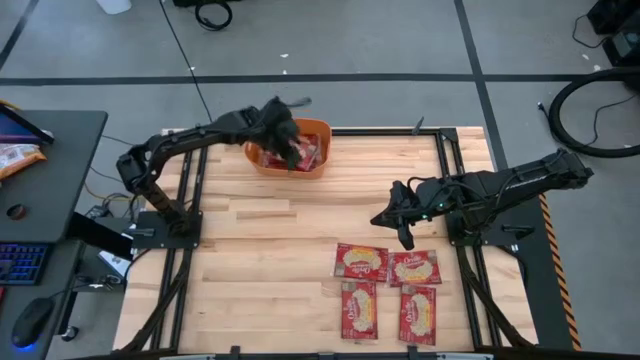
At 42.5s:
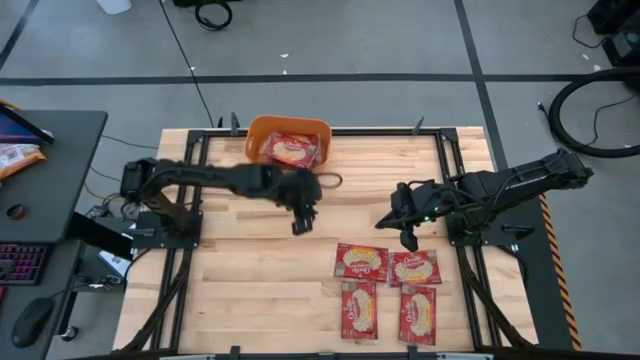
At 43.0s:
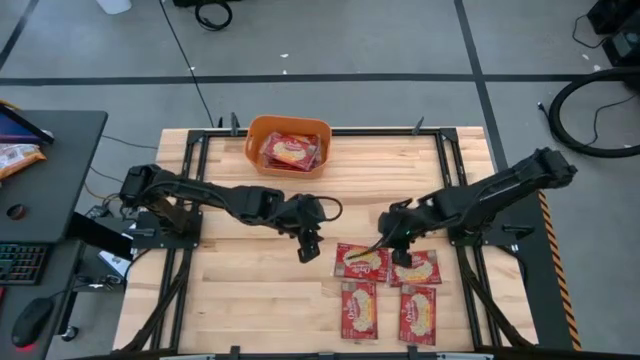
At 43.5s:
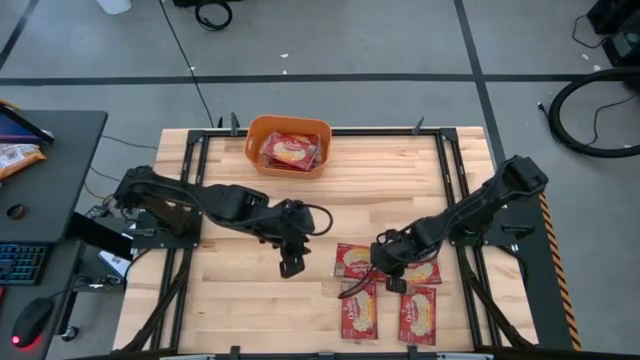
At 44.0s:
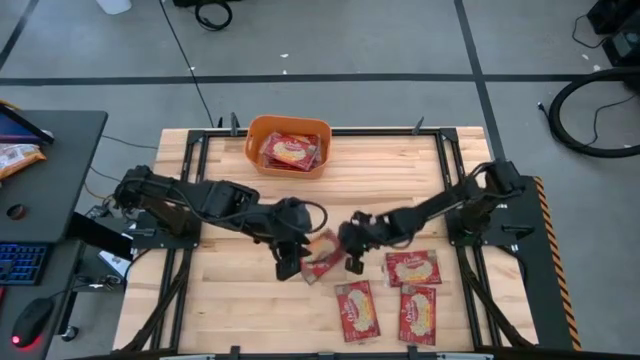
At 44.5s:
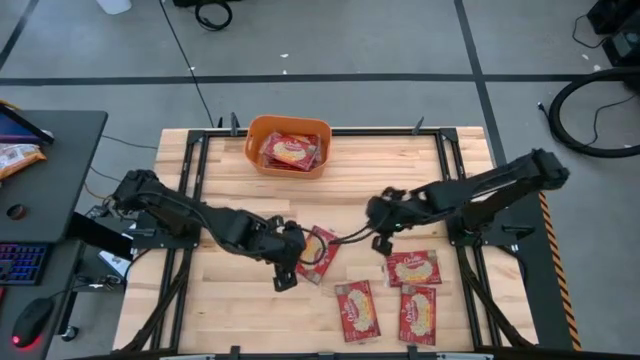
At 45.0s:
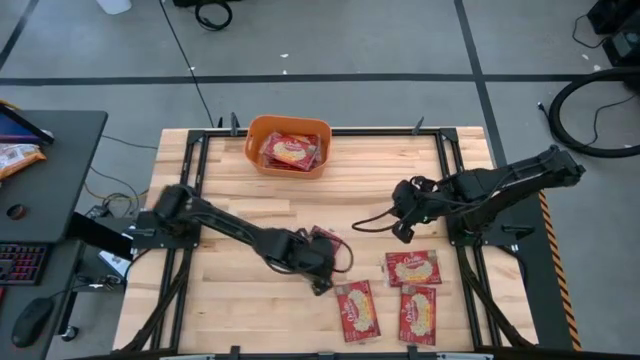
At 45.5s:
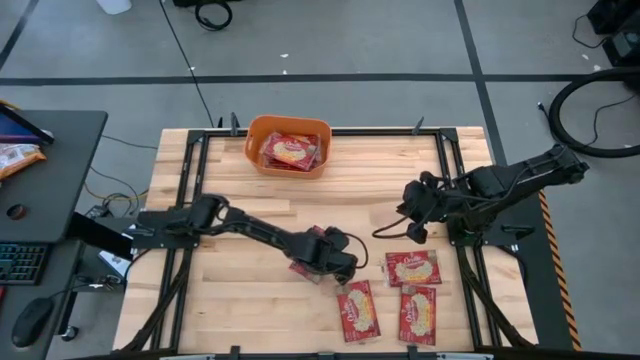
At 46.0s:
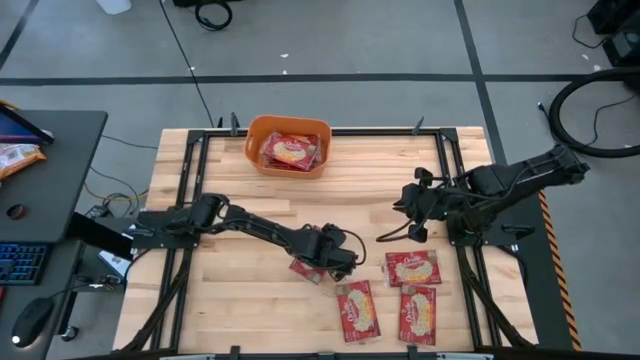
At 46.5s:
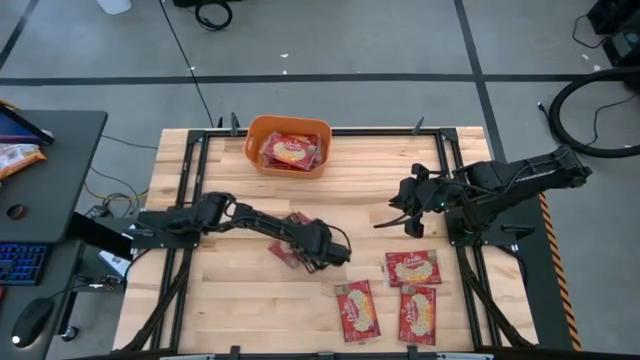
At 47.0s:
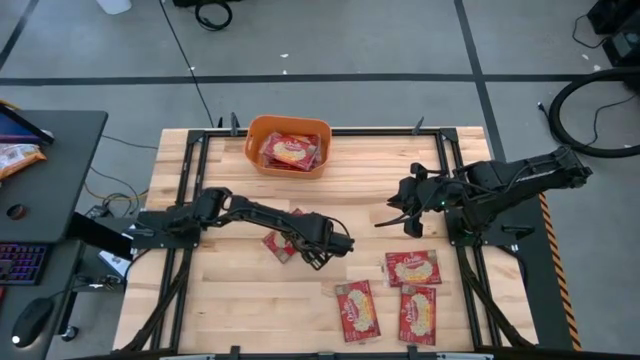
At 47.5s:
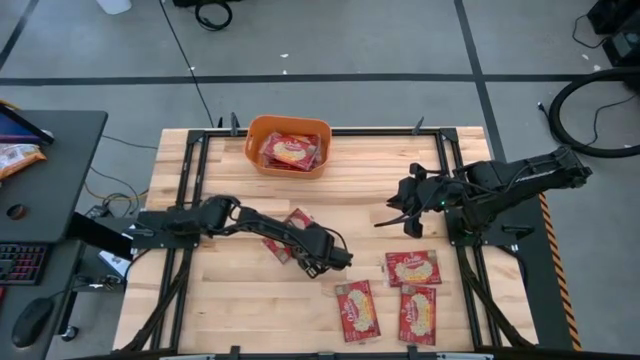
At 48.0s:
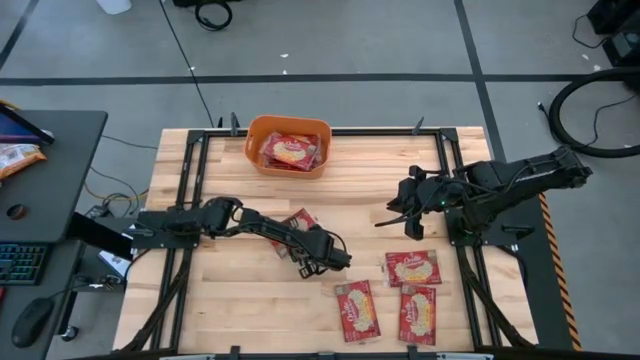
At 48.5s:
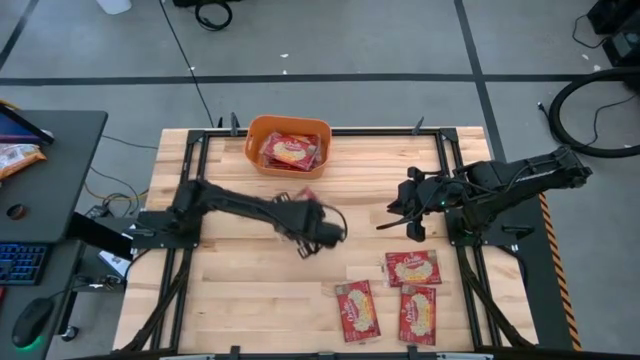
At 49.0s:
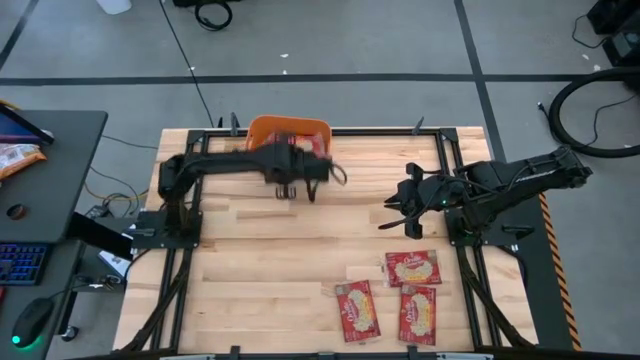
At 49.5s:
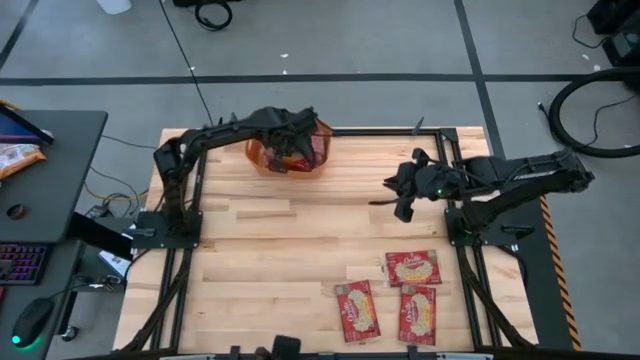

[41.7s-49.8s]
Task: Sort popcorn bags into baskets
Put the red popcorn bag into the orange container

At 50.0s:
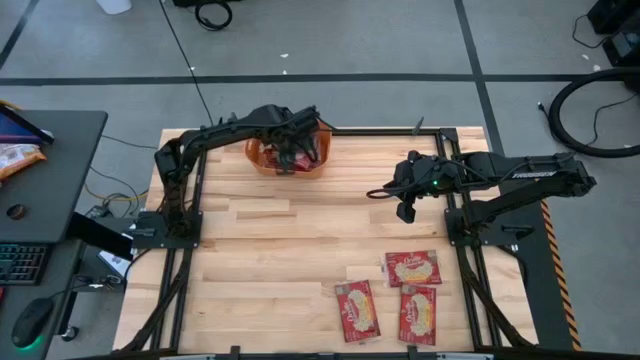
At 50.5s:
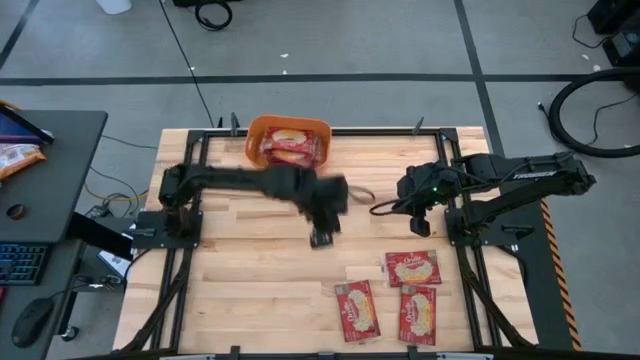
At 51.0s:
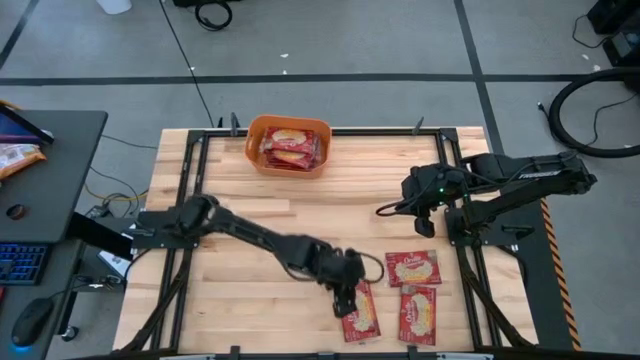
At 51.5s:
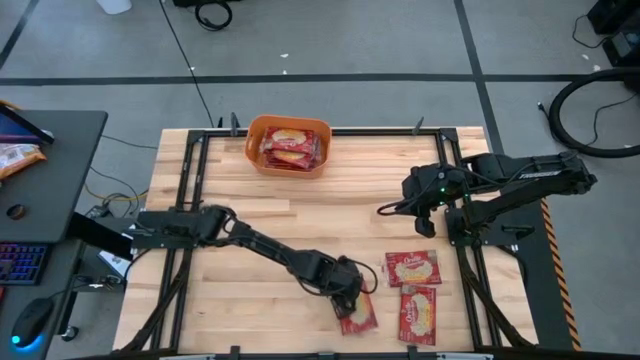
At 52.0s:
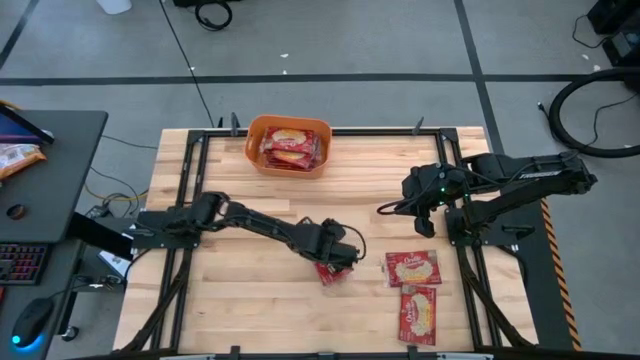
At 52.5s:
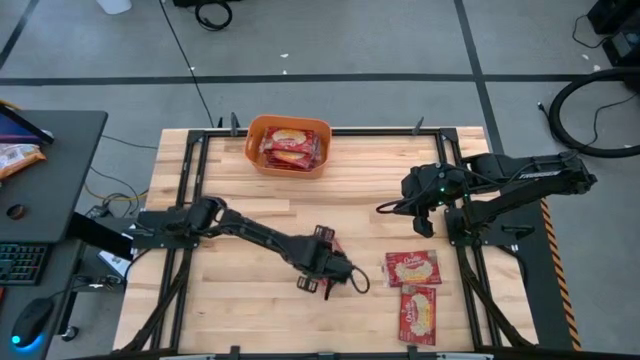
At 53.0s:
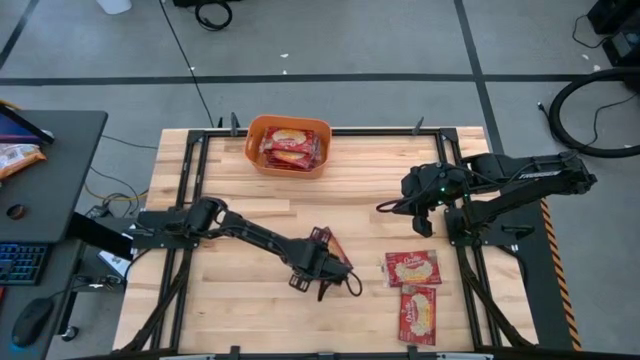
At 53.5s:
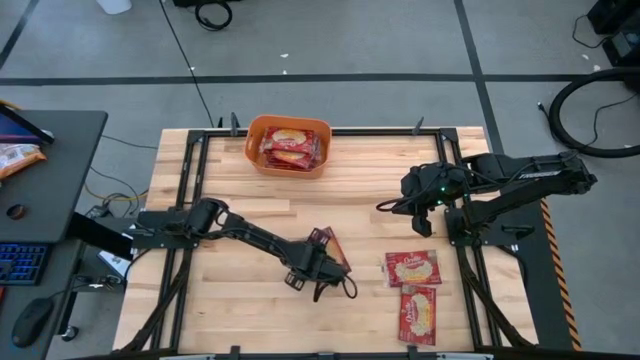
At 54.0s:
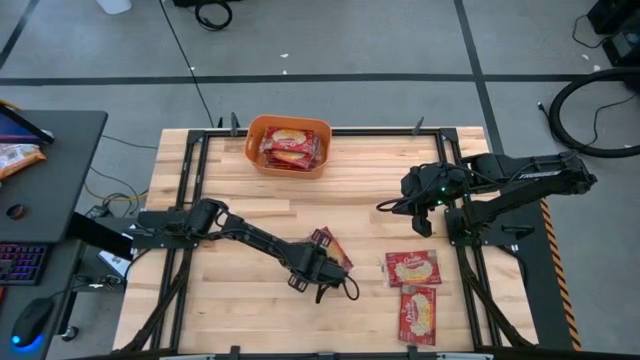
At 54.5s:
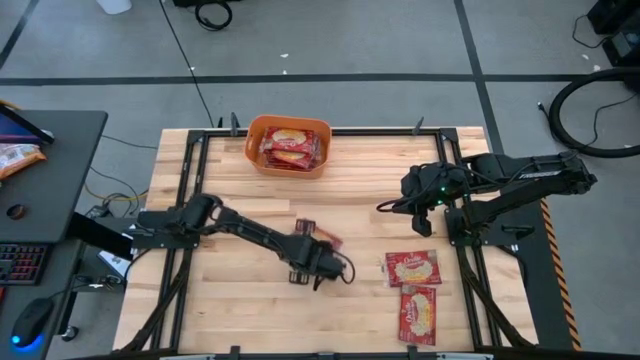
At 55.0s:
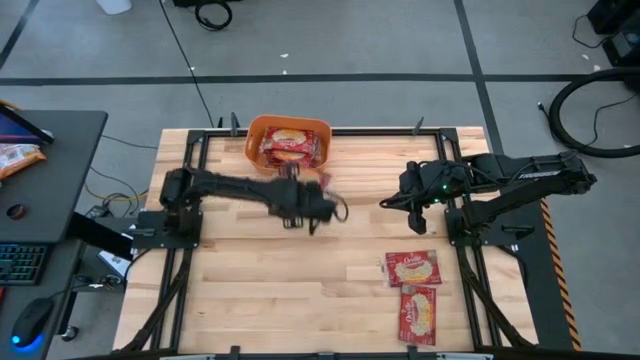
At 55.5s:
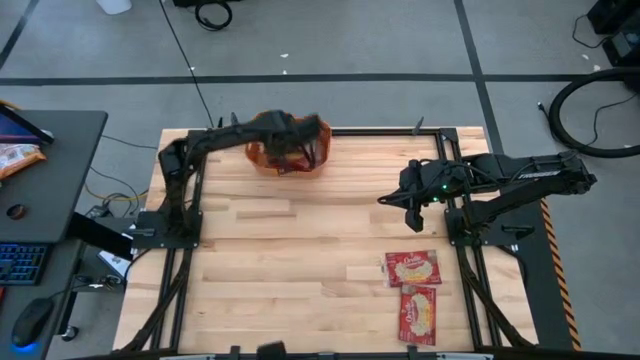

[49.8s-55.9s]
Put the red popcorn bag into the orange container

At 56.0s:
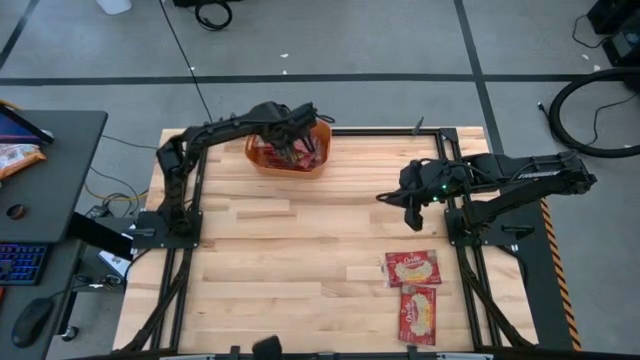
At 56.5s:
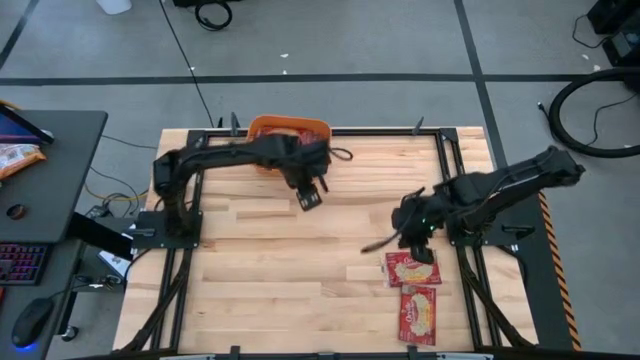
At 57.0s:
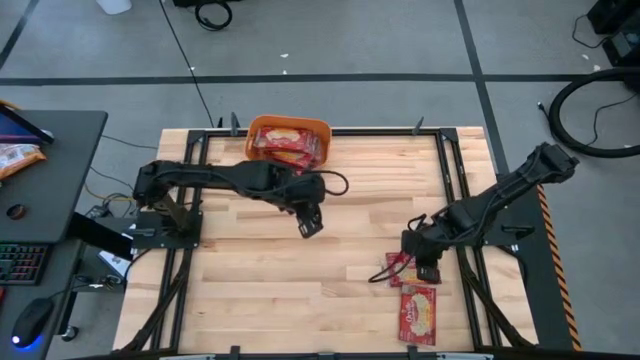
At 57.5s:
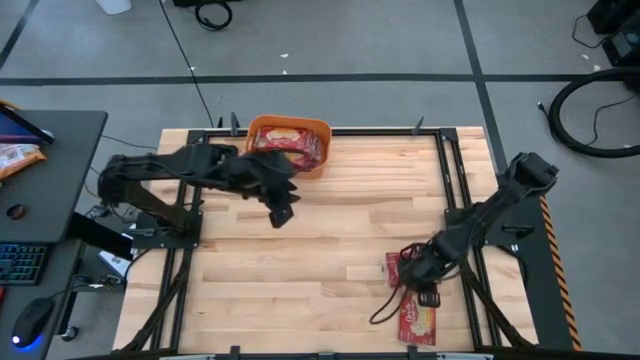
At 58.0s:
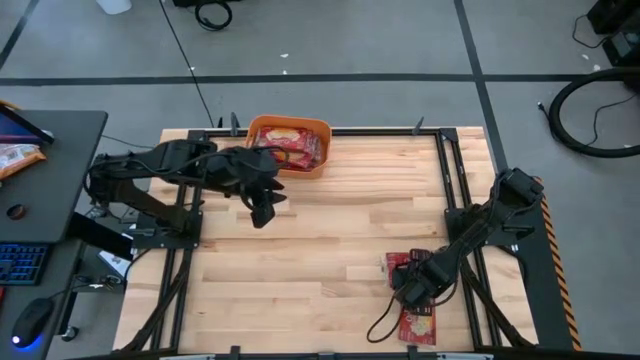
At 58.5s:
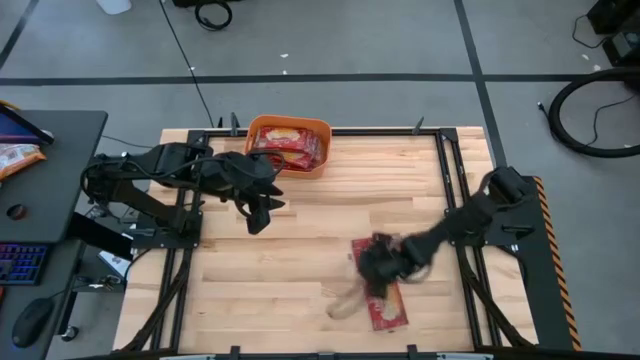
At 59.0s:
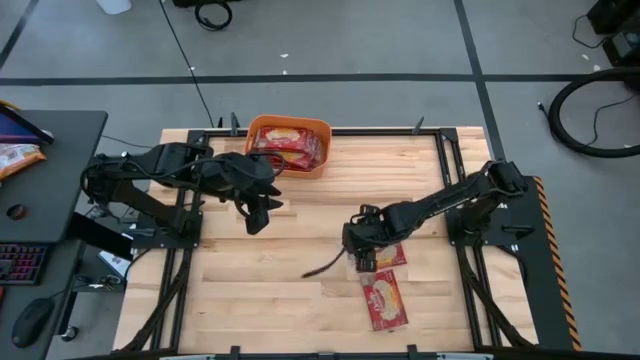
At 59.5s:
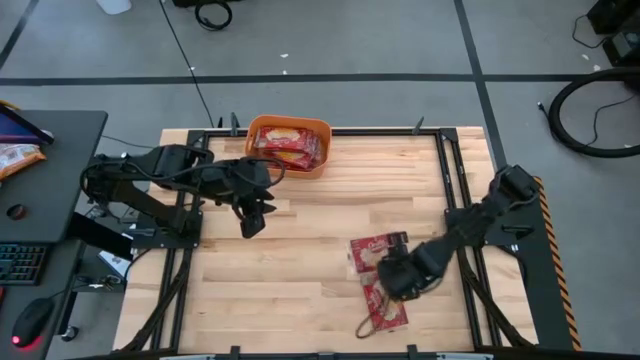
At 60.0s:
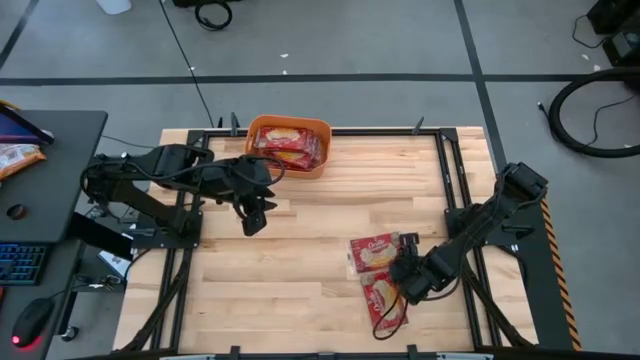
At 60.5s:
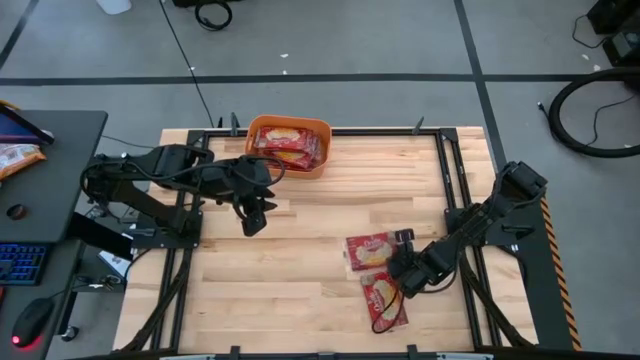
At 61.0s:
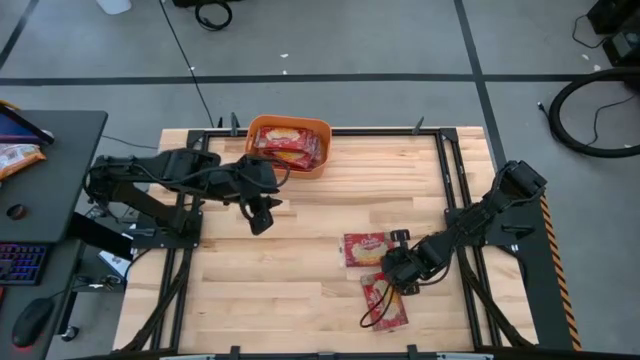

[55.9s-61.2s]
Put the red popcorn bag into the orange container

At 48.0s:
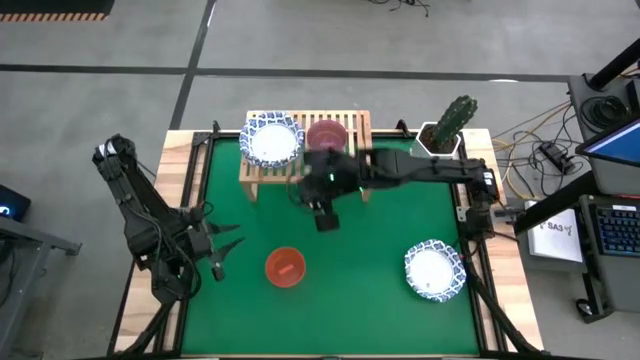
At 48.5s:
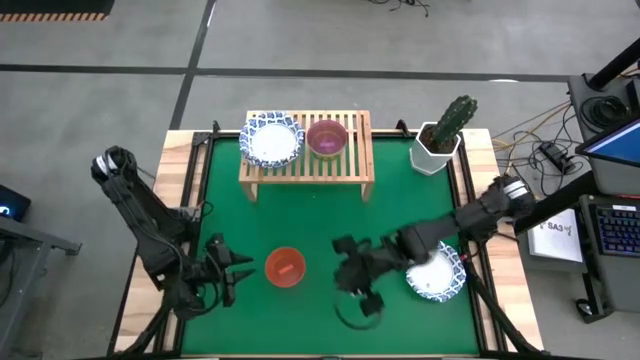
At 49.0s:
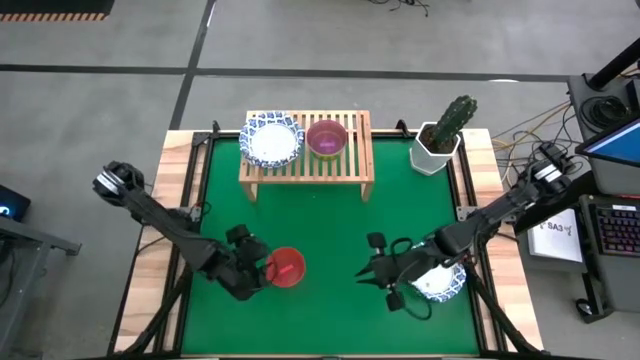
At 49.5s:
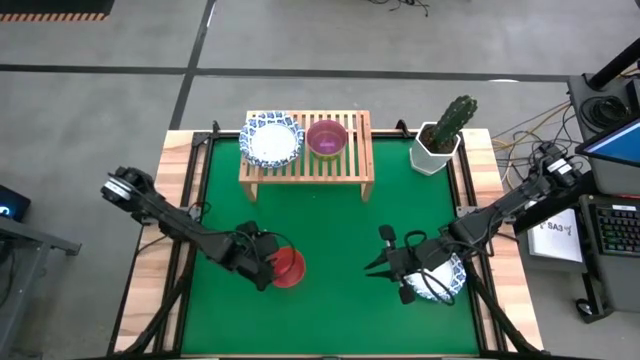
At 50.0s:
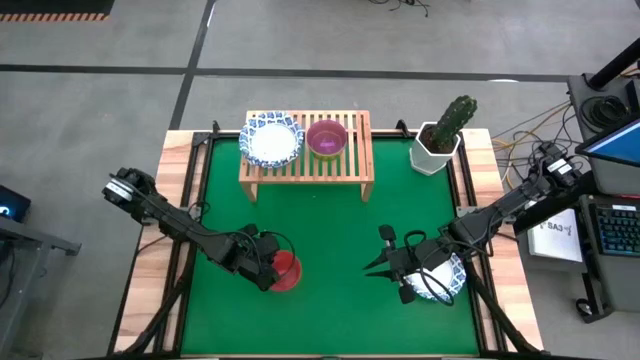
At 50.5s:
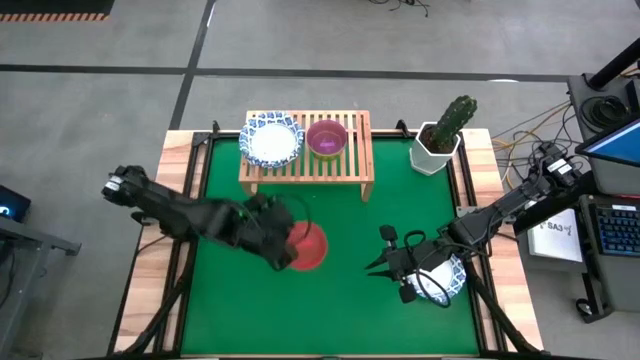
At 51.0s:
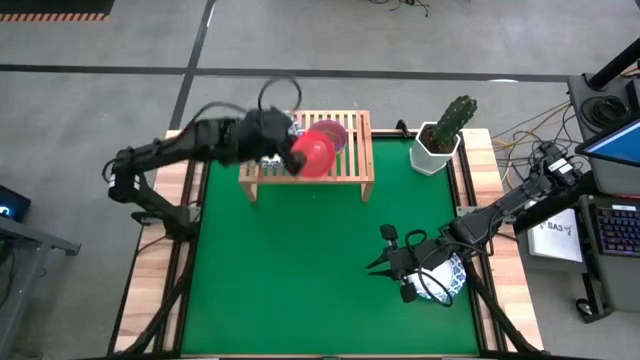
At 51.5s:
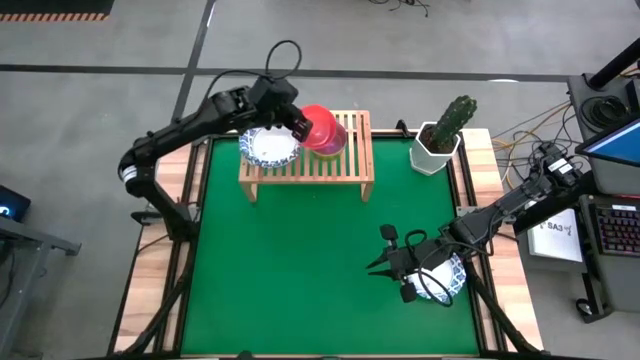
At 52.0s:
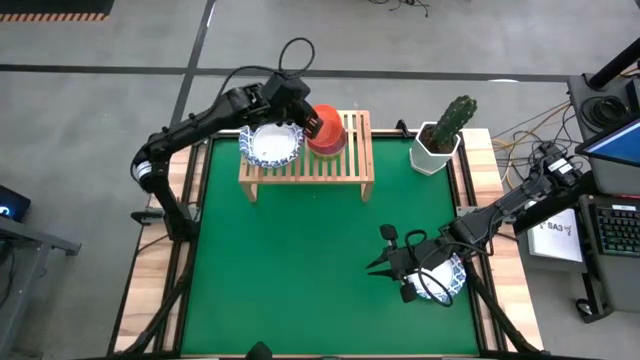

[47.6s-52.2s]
Task: Place and stack bowls onto a shelf
Stack the small red bowl on top of the small purple bowl
